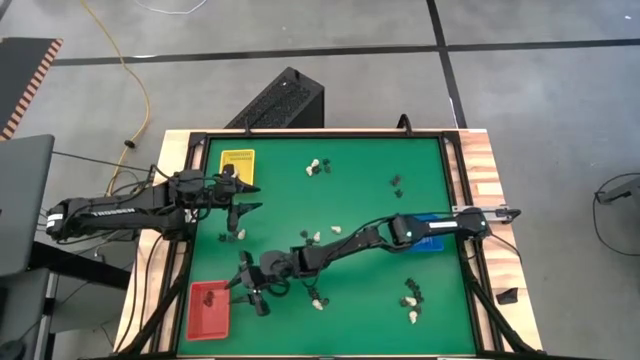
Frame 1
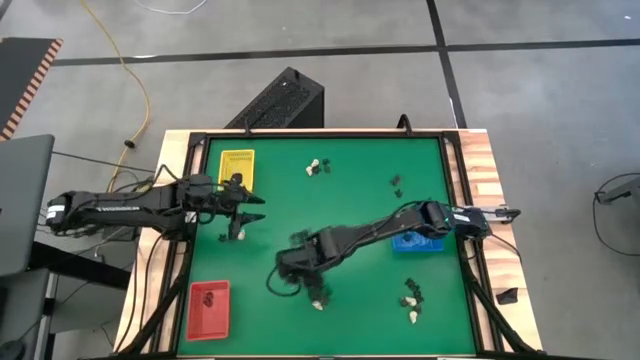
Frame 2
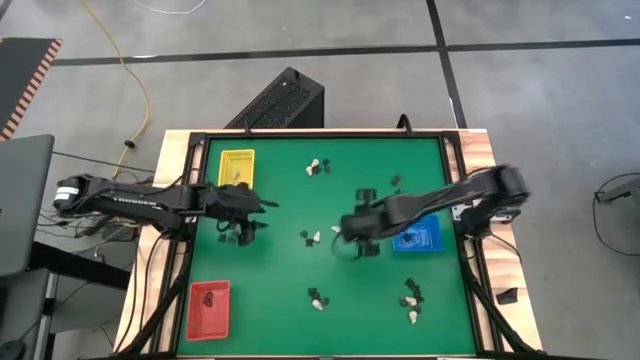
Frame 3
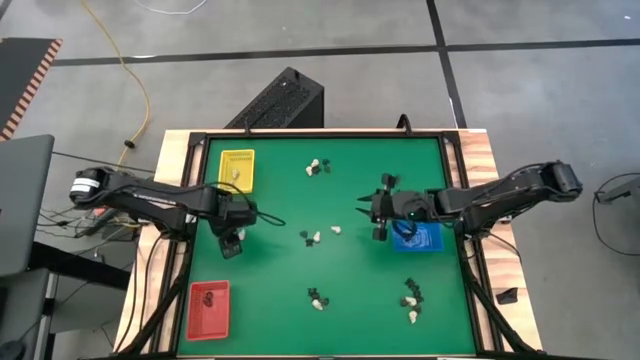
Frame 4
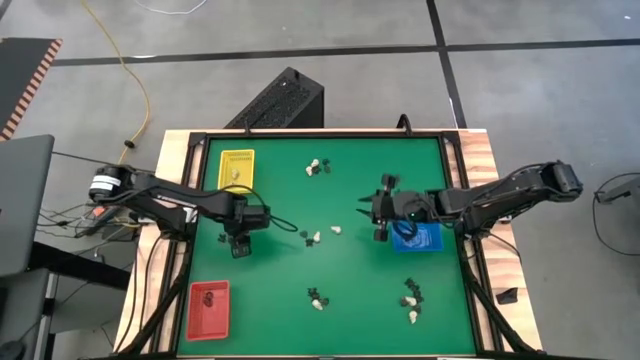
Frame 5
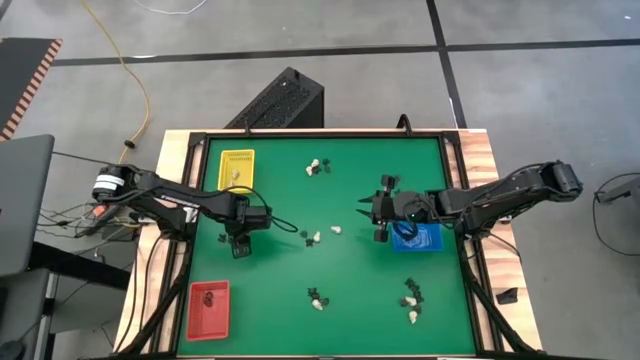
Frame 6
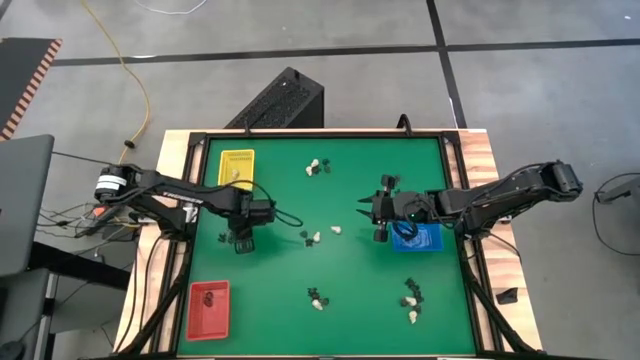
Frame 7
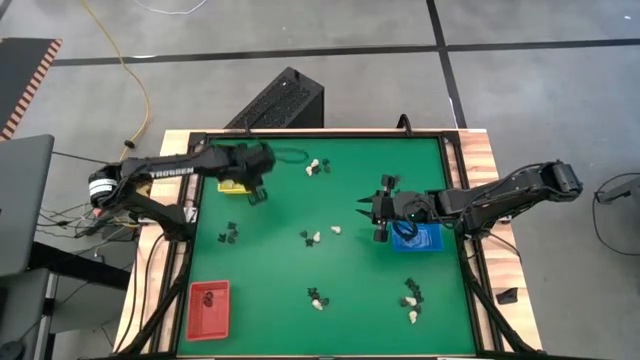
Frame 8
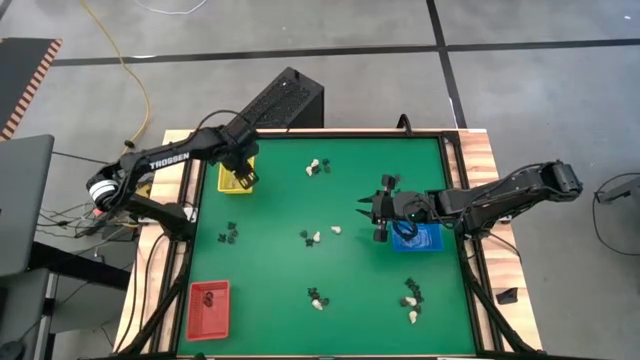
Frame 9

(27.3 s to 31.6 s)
Task: Sort Halloween decoration
Put the white skull toy into the yellow bin

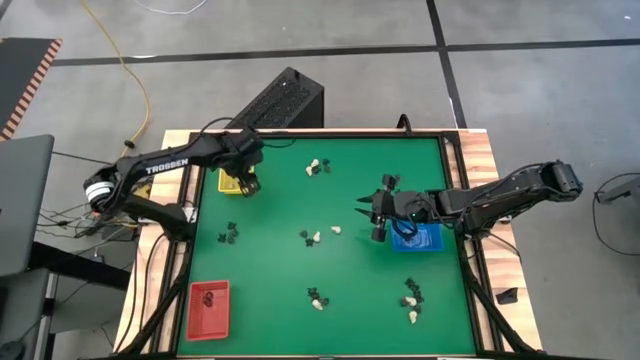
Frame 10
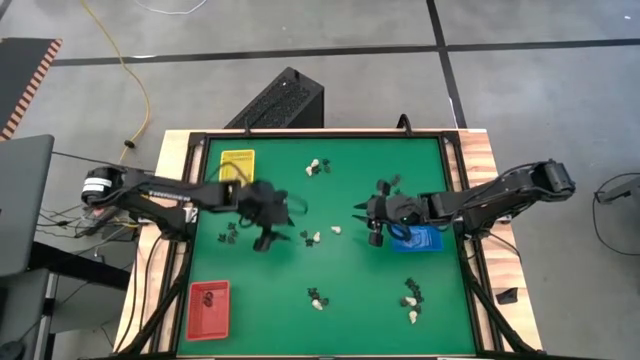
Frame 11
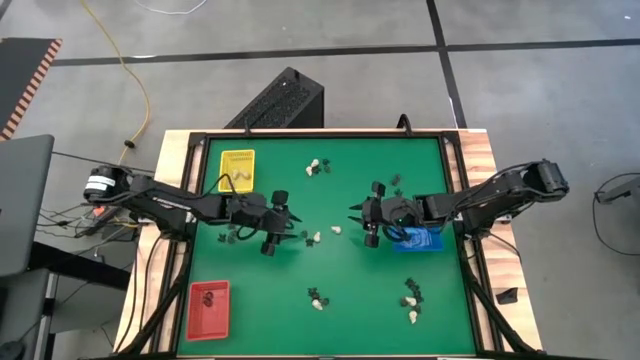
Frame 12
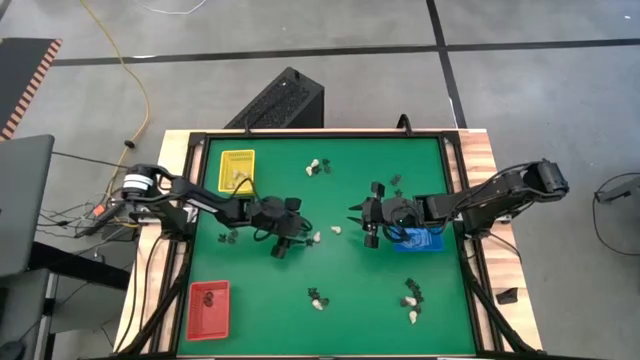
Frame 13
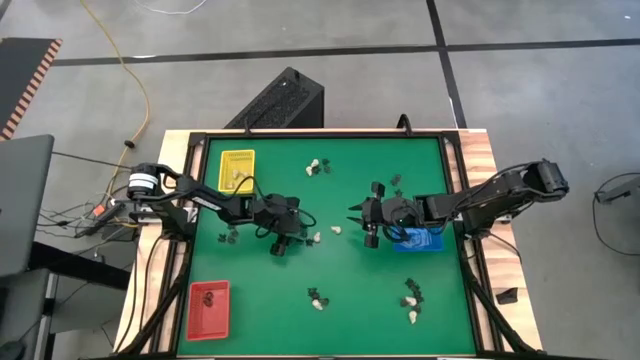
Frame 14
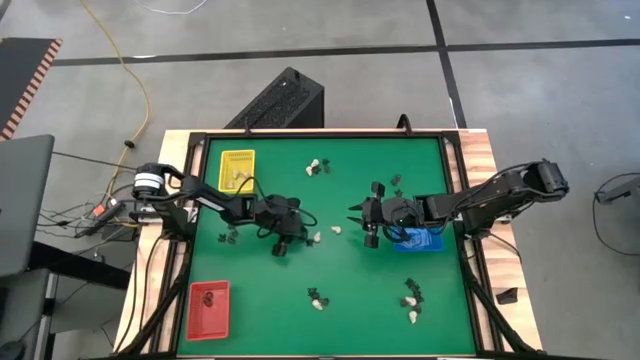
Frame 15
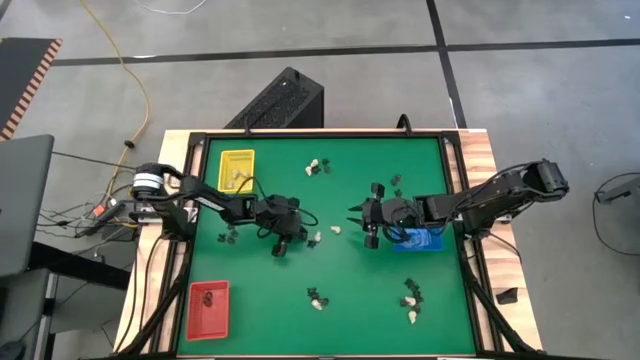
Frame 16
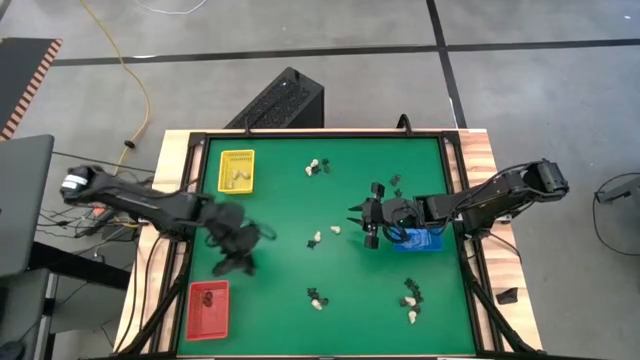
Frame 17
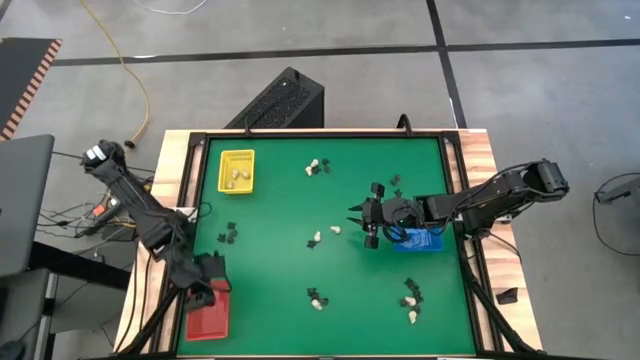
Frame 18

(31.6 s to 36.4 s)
Put the black skull toy into the red bin

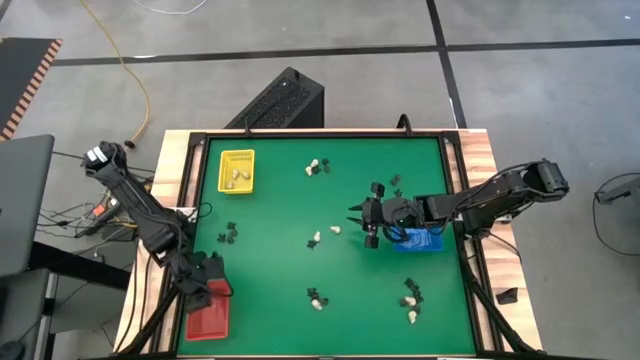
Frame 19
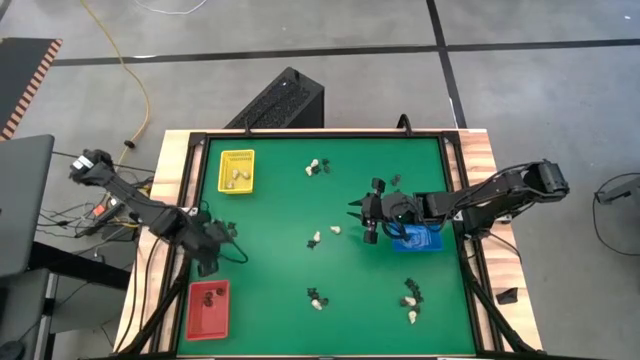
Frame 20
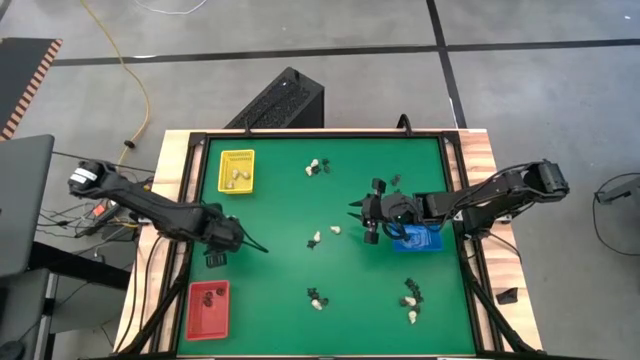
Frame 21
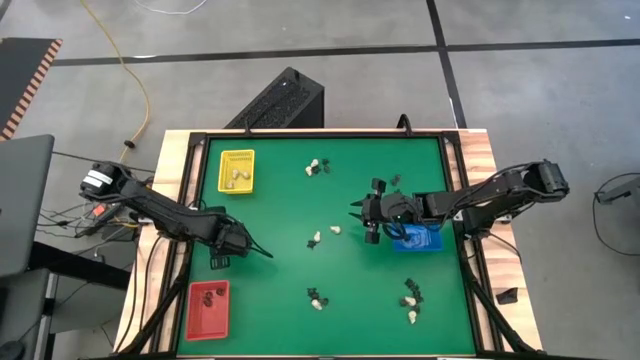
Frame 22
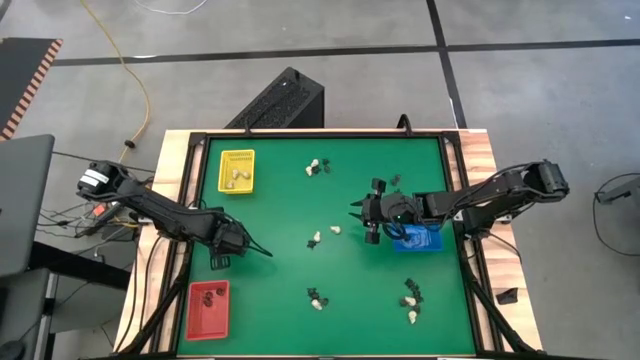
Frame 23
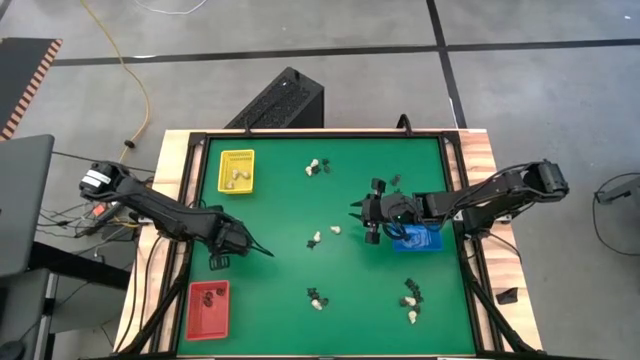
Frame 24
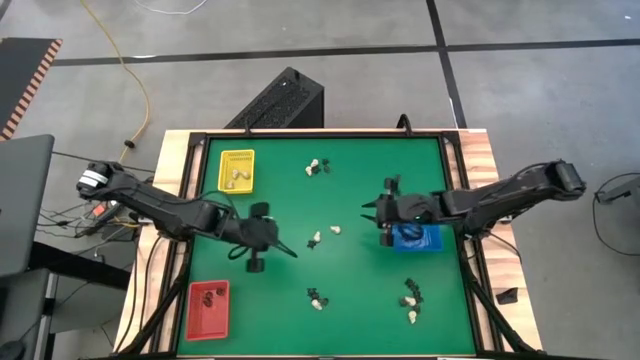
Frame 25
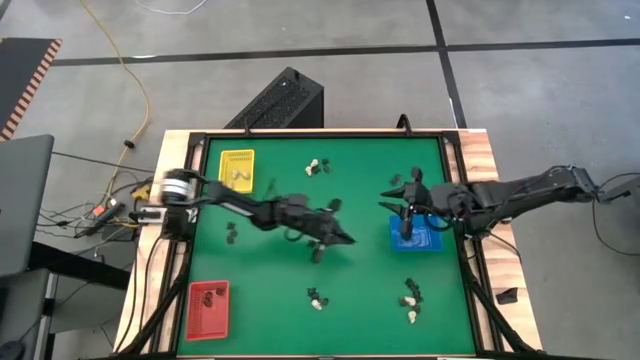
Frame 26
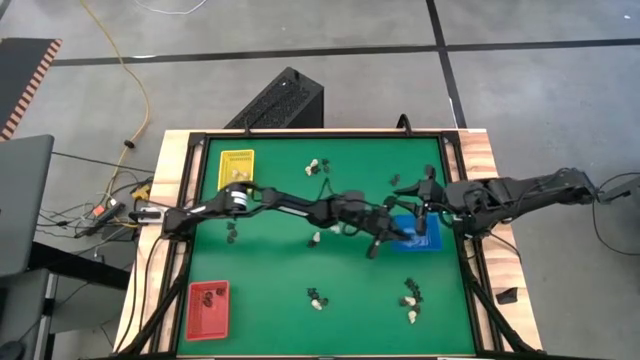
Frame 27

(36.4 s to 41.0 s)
Put the black spider toy into the blue bin

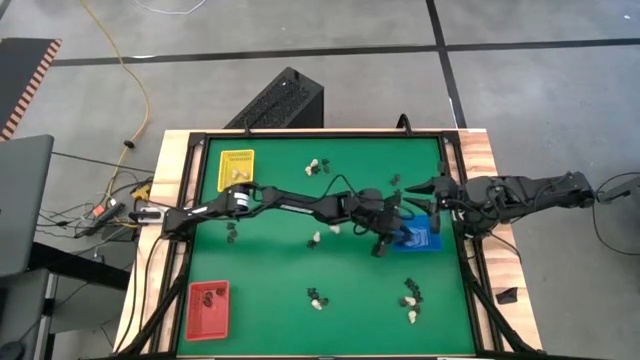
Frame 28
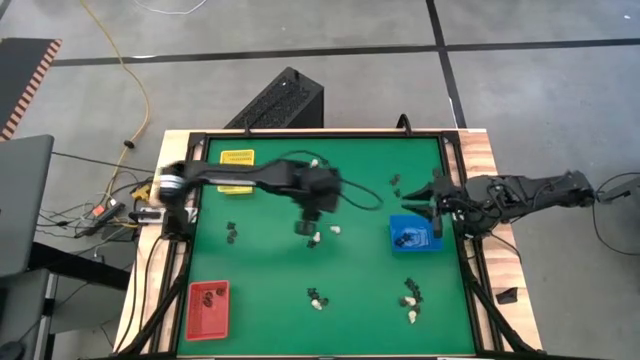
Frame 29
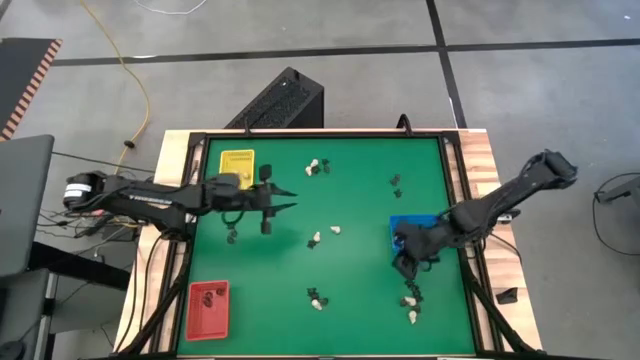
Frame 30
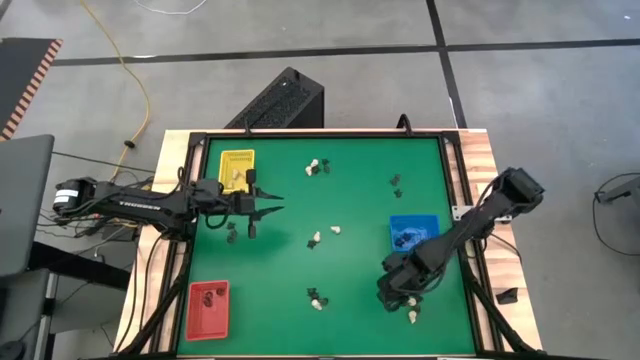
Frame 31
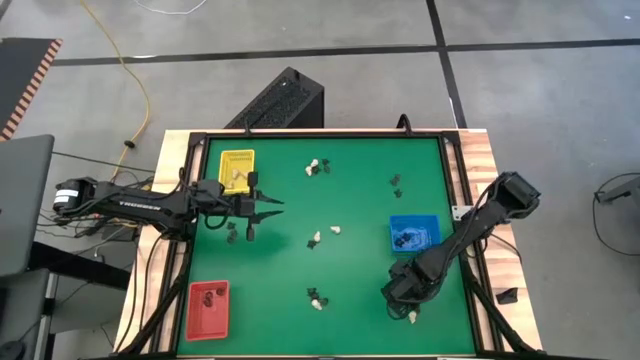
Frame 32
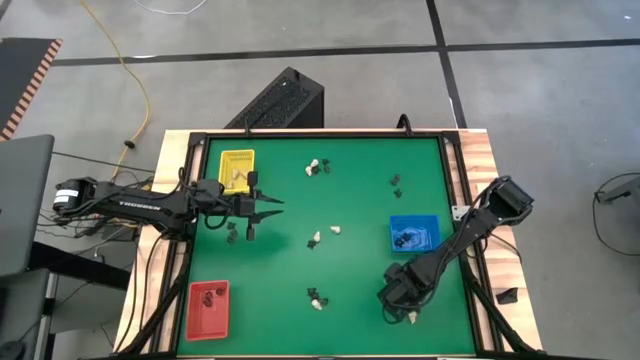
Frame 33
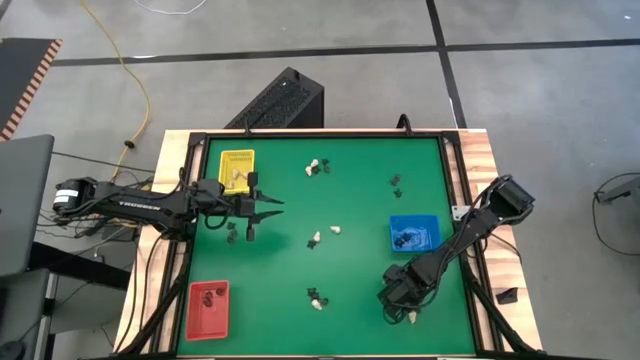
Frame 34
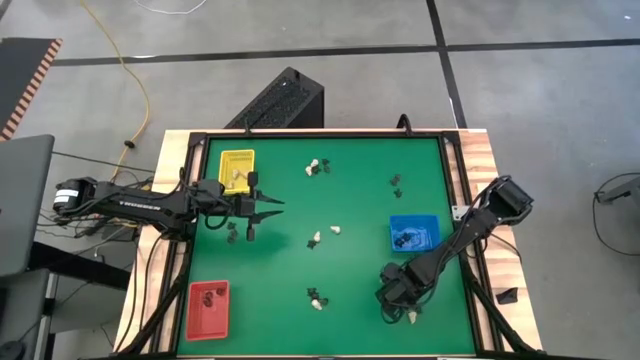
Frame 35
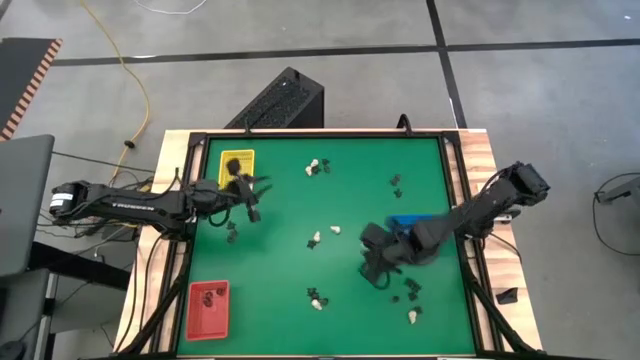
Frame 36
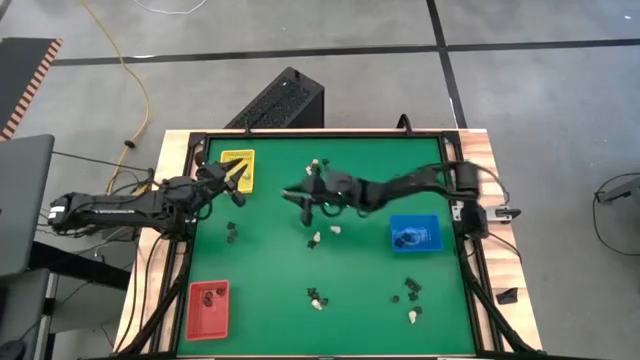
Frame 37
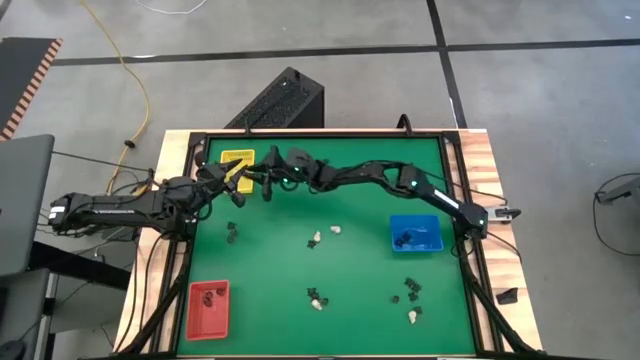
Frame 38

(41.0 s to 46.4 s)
Put the white skull toy into the yellow bin

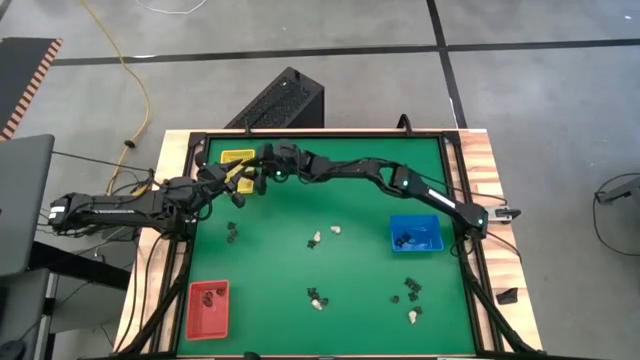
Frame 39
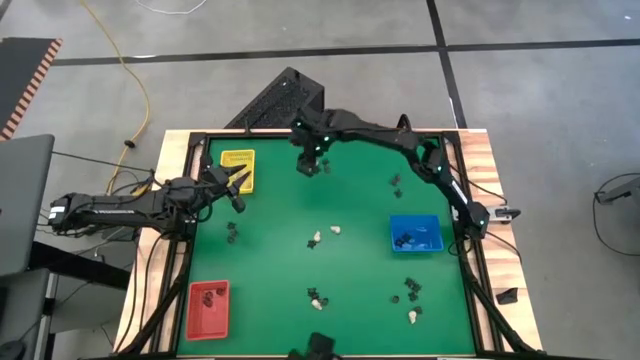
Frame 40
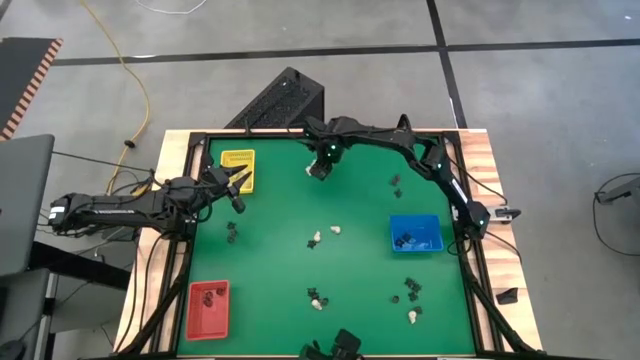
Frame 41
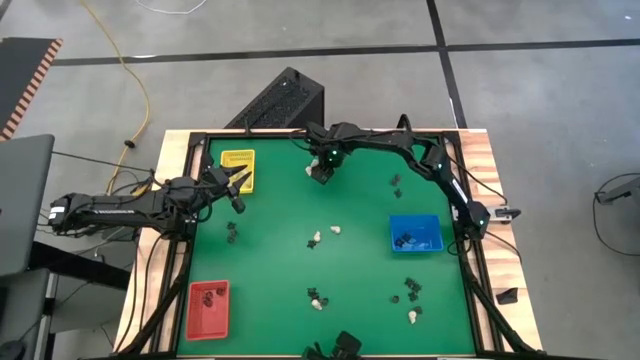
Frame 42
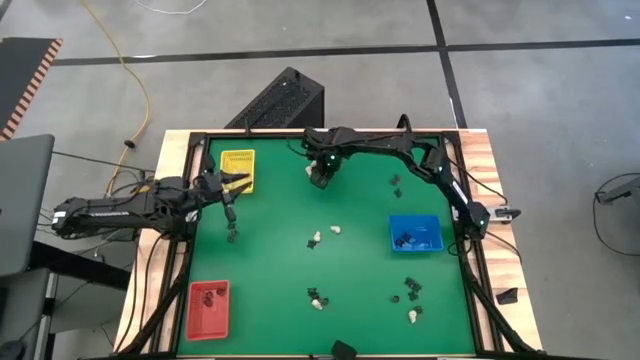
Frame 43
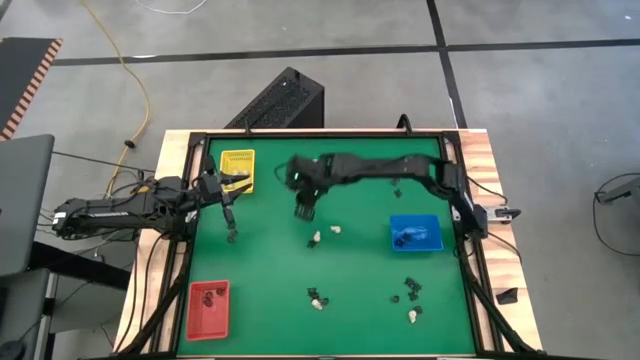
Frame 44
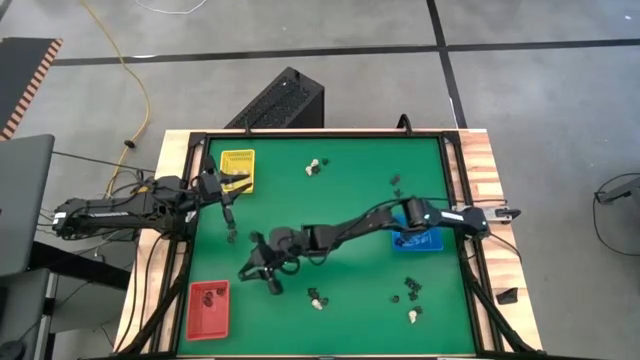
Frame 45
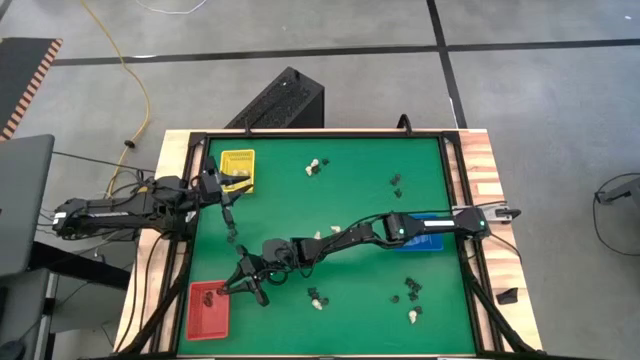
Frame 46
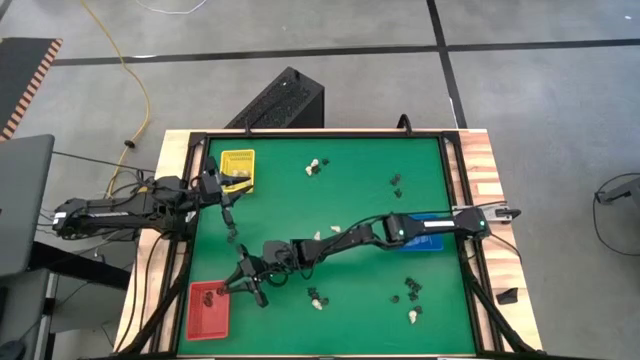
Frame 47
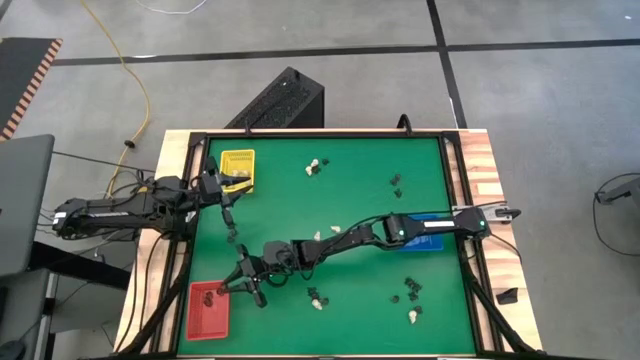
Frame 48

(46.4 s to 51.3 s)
Put the black skull toy into the red bin
